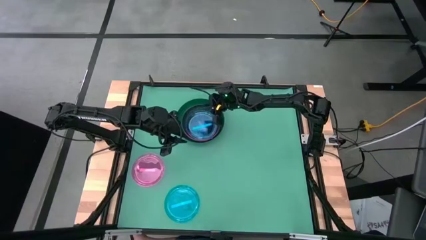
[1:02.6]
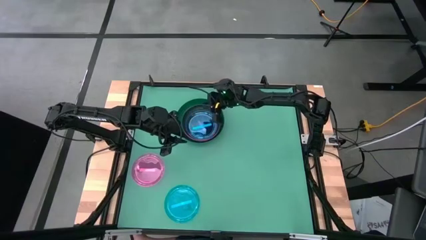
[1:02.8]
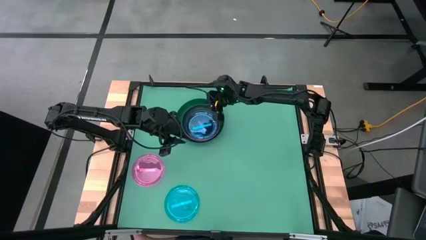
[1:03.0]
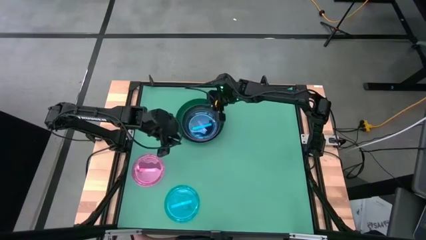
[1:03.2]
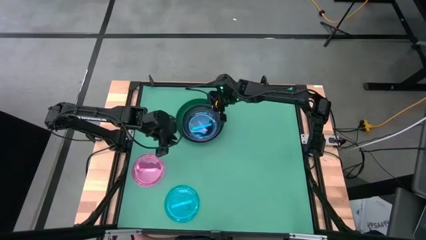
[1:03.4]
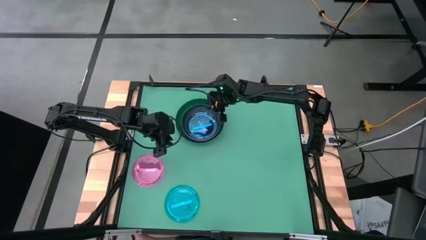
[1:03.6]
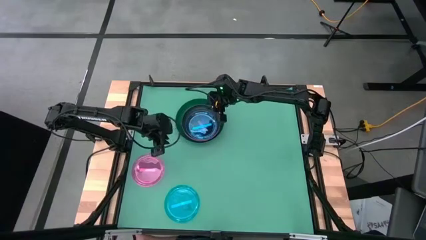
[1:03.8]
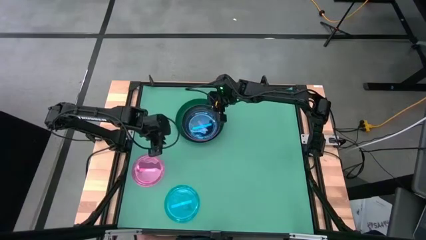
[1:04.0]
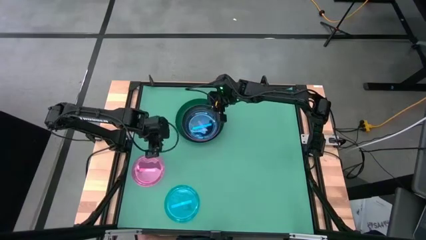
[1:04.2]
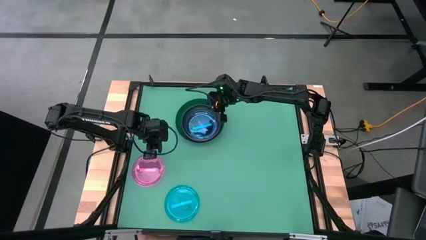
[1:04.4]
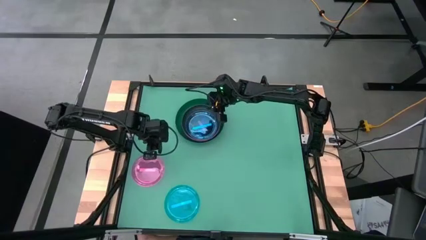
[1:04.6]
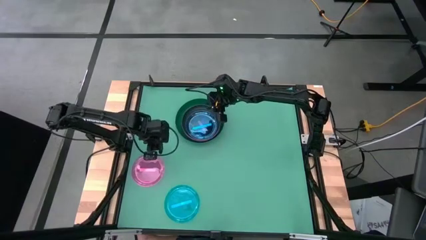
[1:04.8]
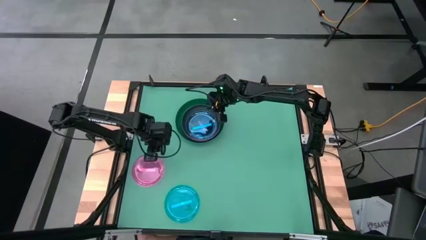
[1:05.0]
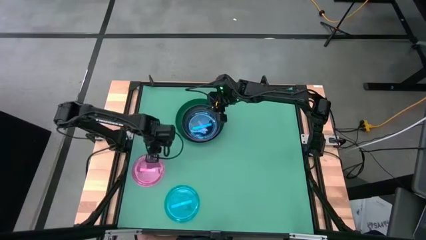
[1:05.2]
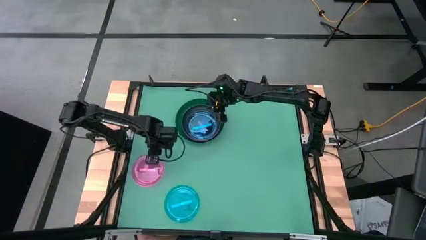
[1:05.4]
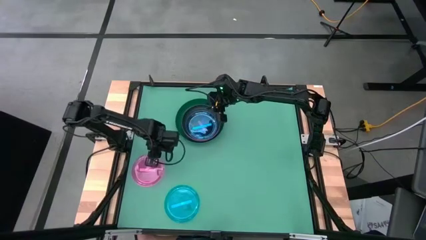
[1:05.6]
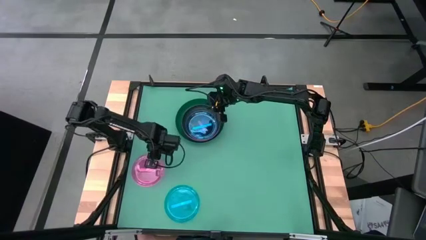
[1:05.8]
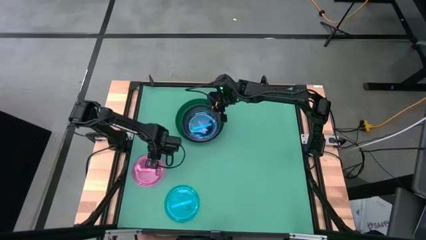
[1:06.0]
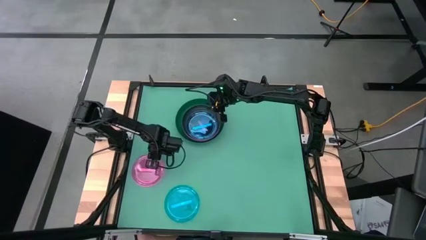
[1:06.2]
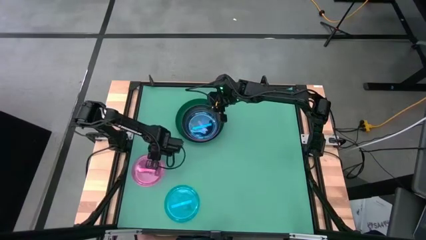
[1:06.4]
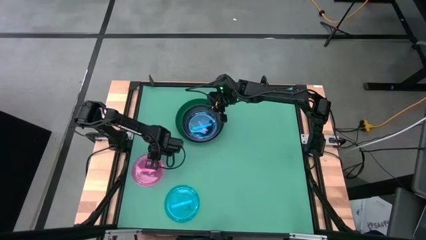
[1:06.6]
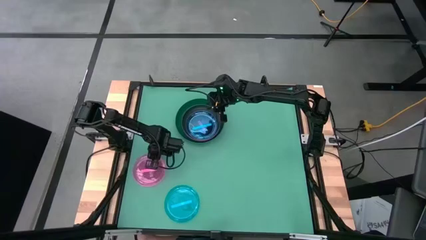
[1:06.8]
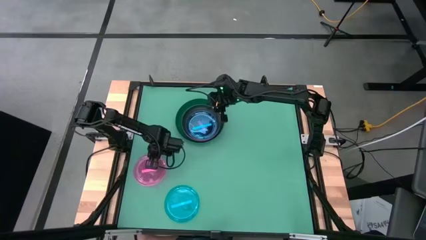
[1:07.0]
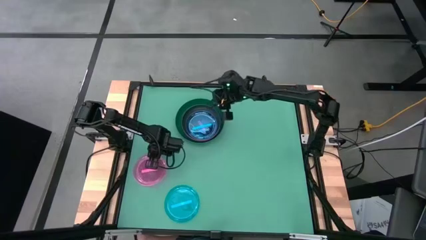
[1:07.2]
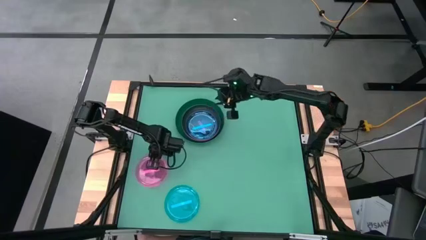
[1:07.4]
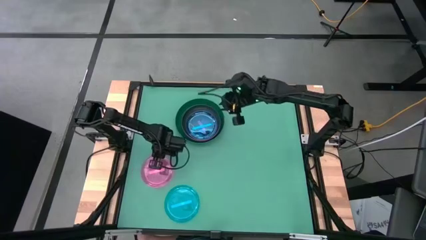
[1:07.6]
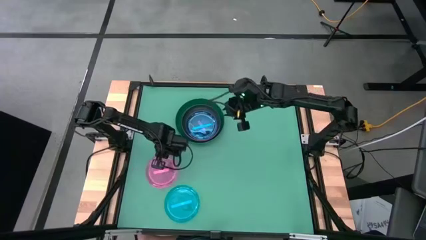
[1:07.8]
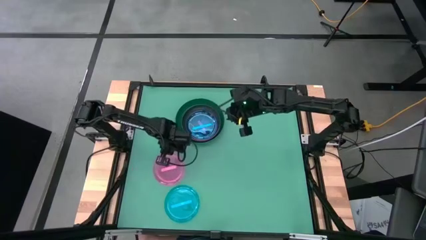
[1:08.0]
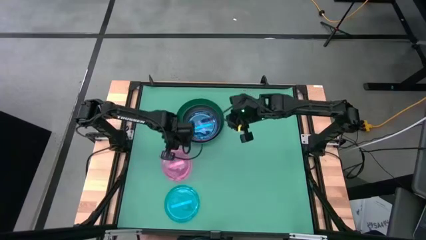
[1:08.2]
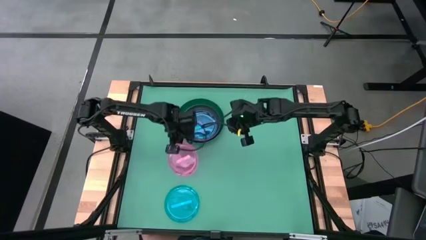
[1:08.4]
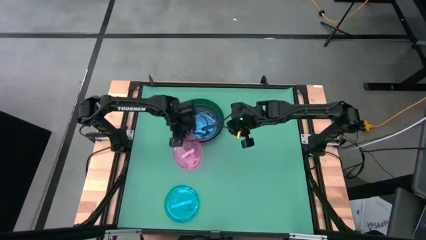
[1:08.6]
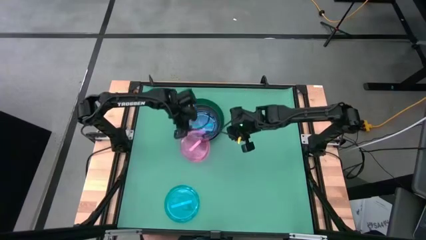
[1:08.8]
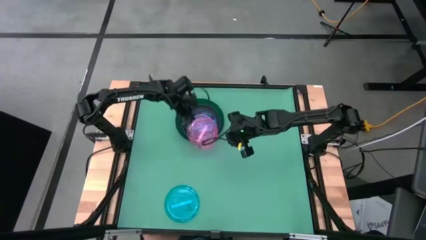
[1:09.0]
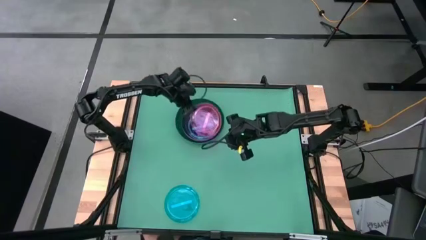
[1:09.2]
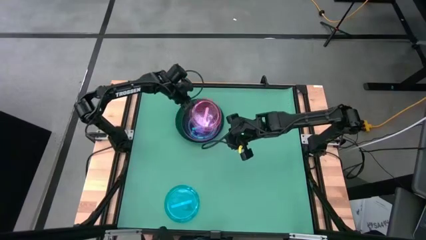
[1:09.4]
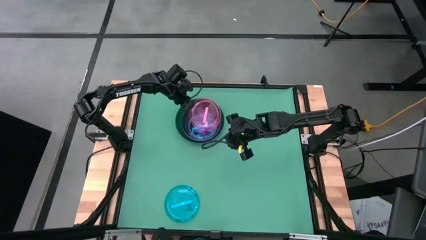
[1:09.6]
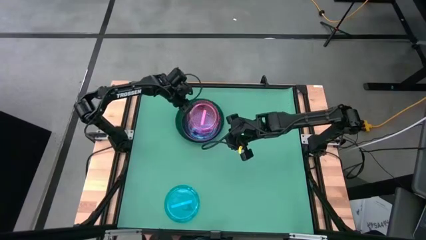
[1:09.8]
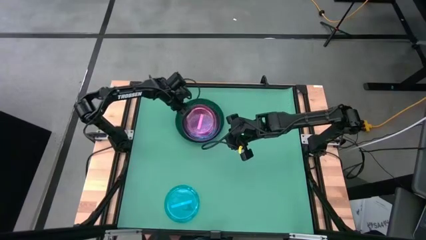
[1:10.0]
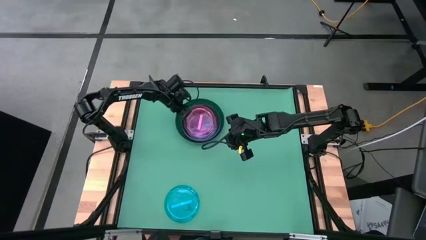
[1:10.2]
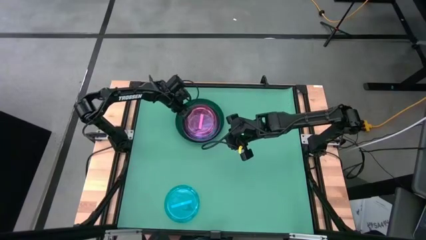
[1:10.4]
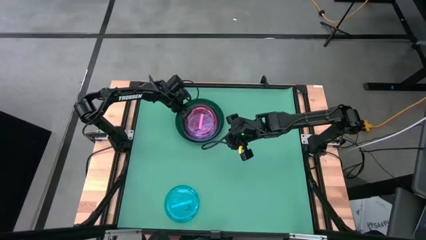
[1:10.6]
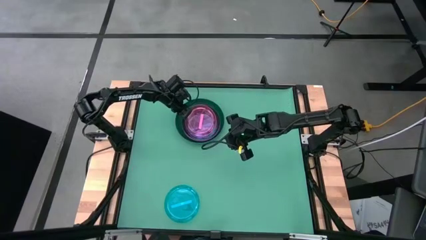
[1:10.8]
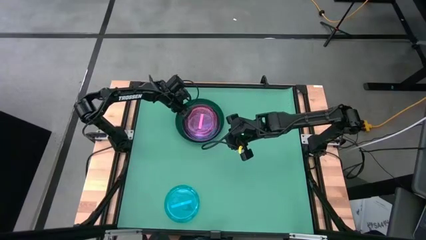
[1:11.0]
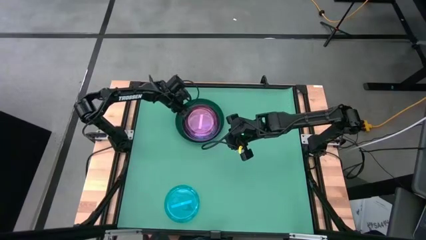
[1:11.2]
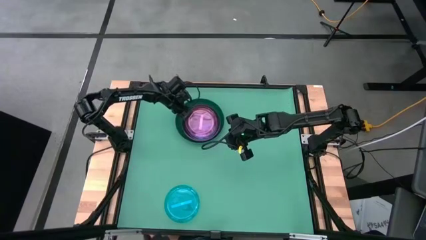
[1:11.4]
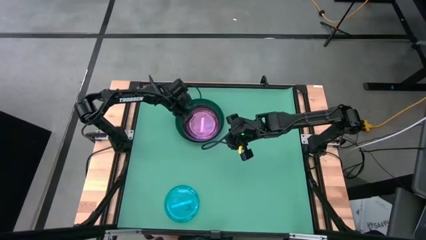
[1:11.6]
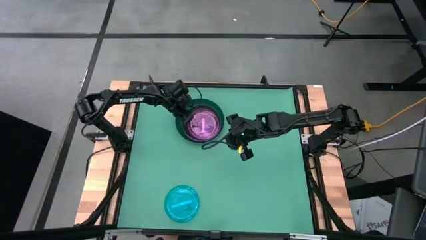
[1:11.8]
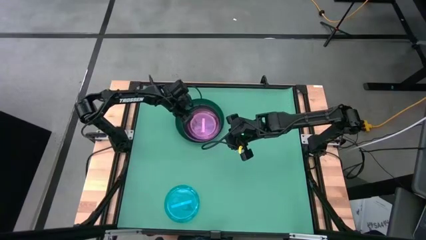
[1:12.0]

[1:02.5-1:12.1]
Task: Stack plastic plates
Stack the light pink plate on top of the blue plate

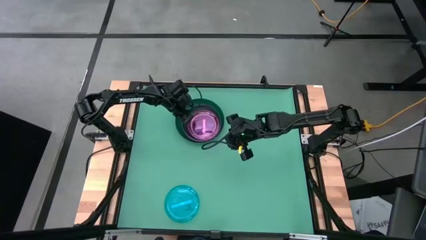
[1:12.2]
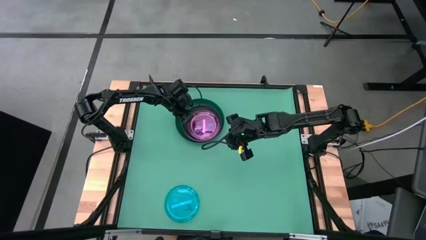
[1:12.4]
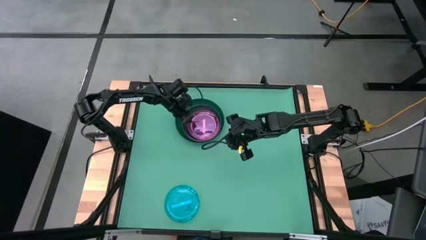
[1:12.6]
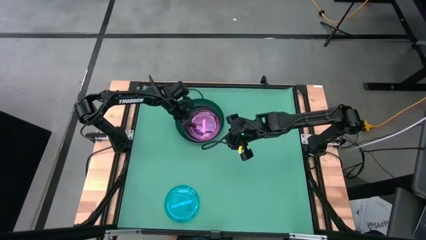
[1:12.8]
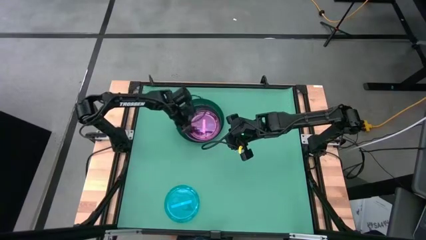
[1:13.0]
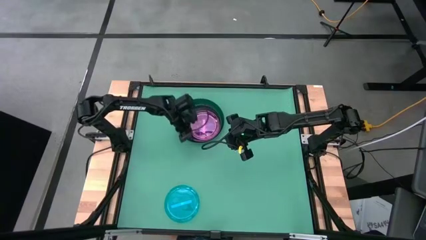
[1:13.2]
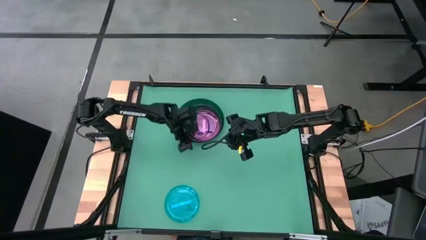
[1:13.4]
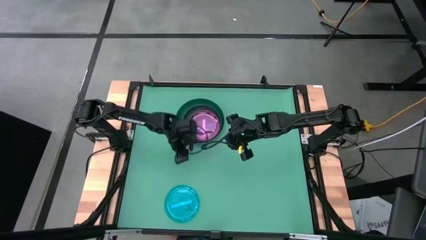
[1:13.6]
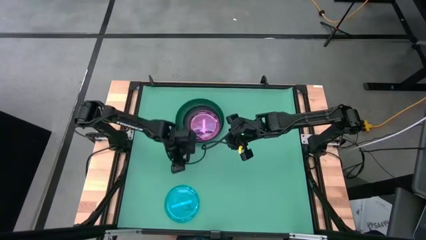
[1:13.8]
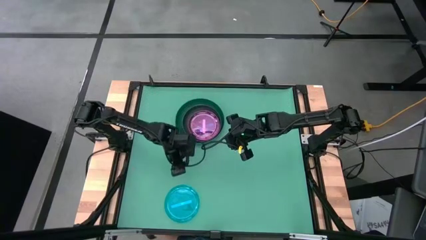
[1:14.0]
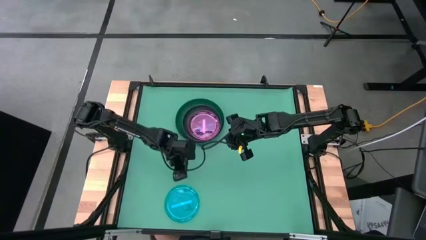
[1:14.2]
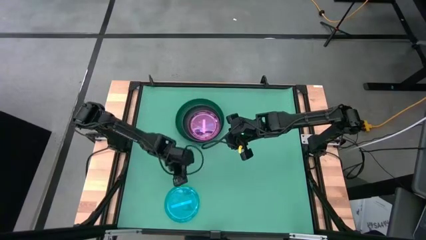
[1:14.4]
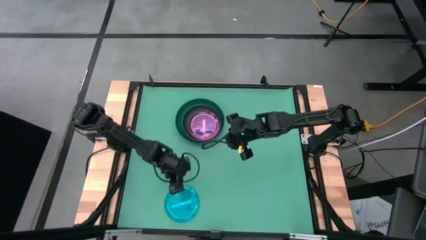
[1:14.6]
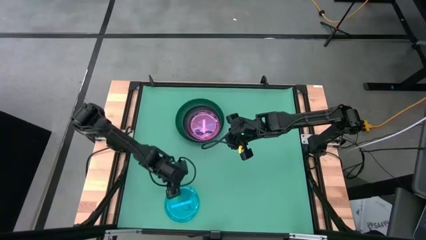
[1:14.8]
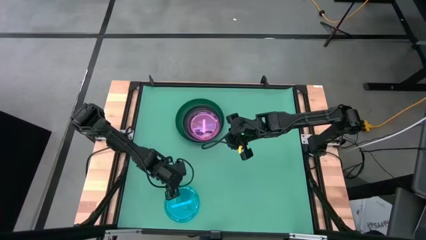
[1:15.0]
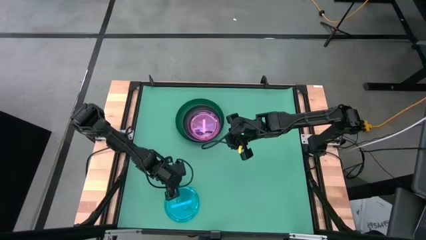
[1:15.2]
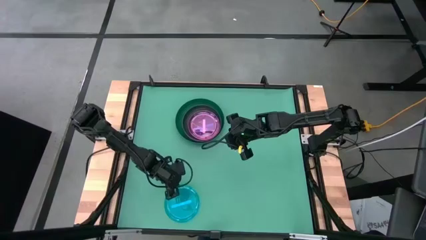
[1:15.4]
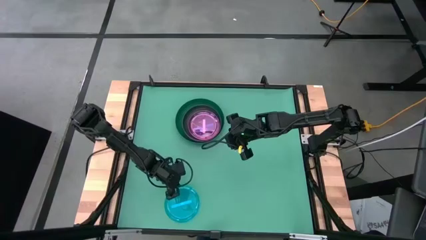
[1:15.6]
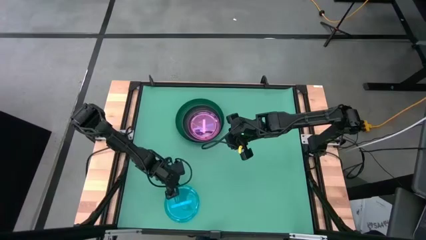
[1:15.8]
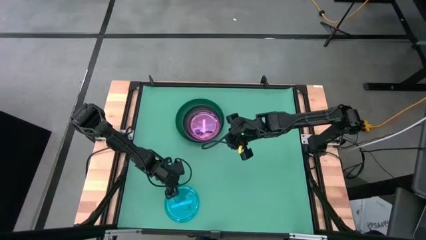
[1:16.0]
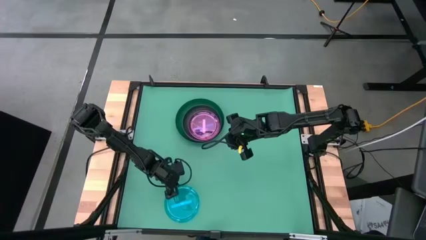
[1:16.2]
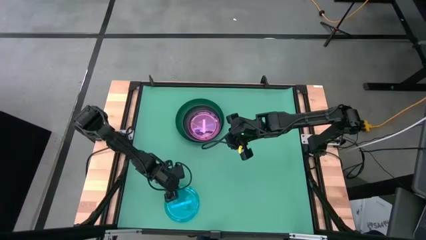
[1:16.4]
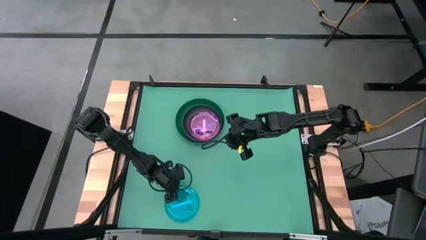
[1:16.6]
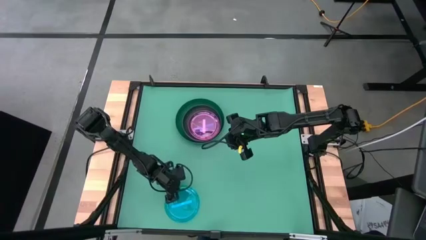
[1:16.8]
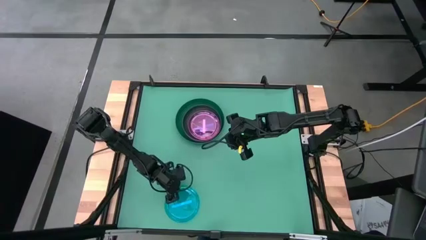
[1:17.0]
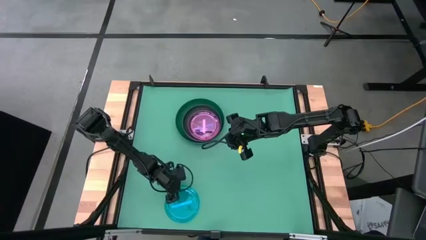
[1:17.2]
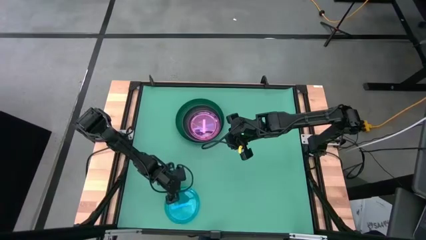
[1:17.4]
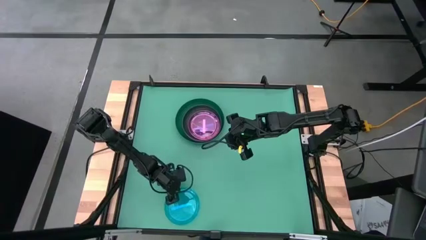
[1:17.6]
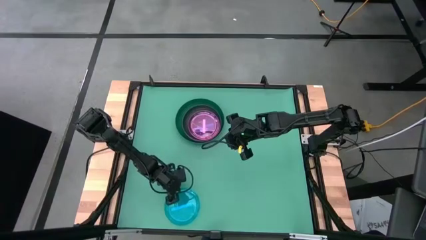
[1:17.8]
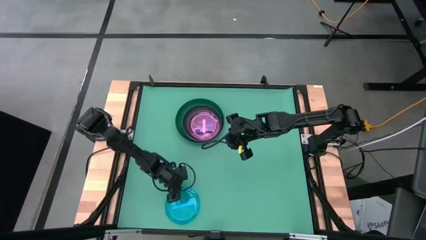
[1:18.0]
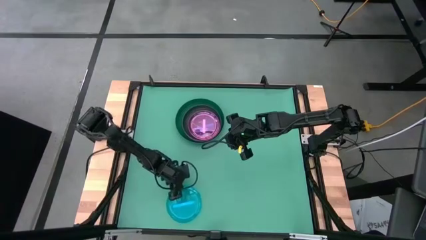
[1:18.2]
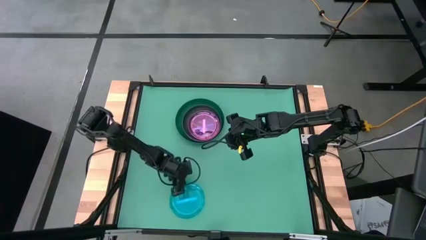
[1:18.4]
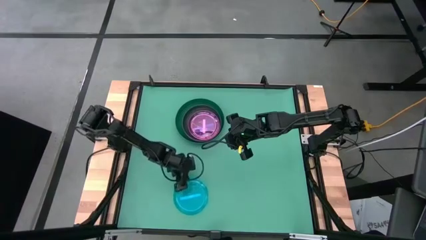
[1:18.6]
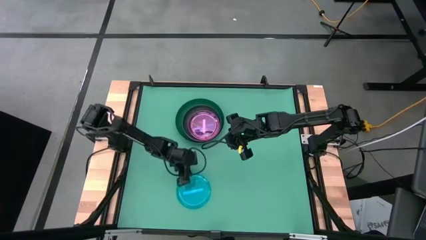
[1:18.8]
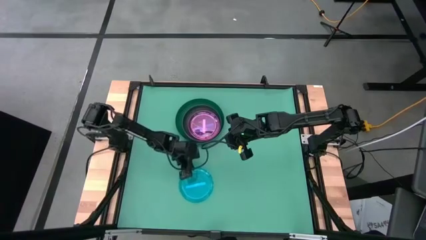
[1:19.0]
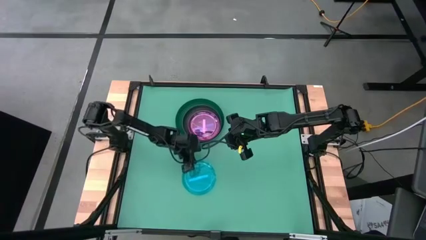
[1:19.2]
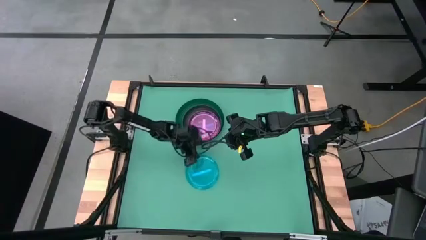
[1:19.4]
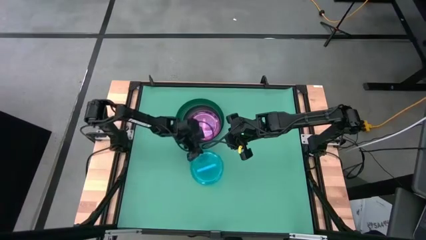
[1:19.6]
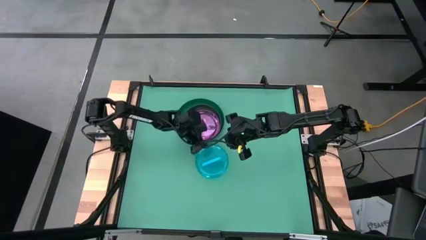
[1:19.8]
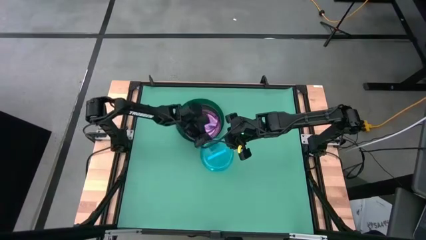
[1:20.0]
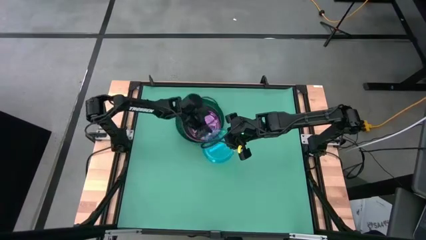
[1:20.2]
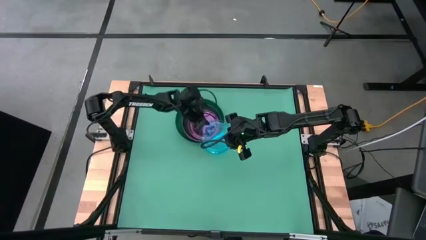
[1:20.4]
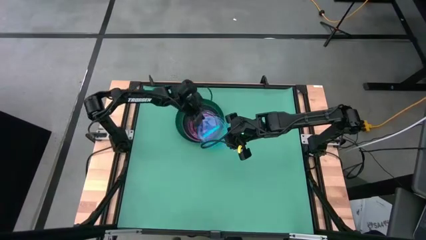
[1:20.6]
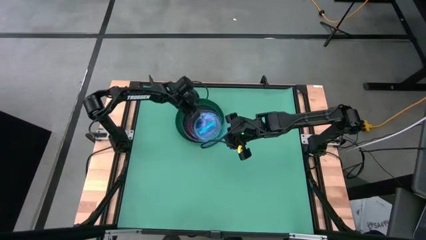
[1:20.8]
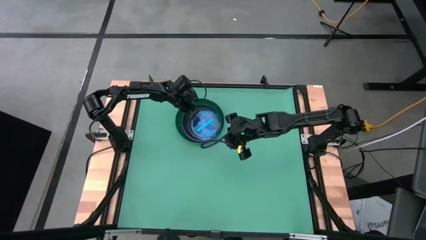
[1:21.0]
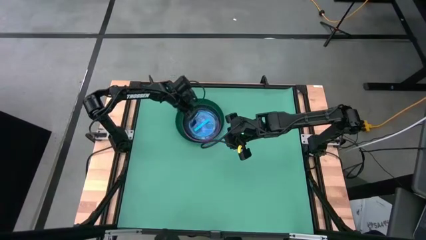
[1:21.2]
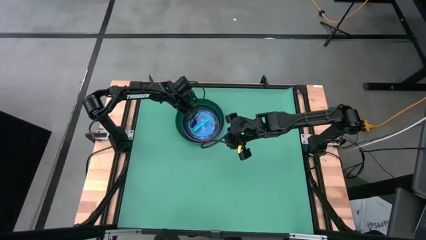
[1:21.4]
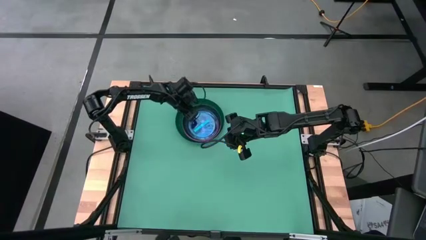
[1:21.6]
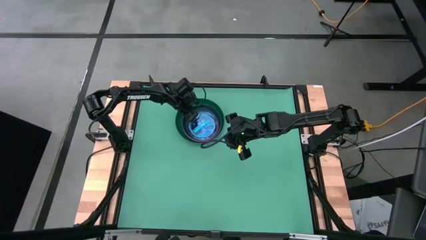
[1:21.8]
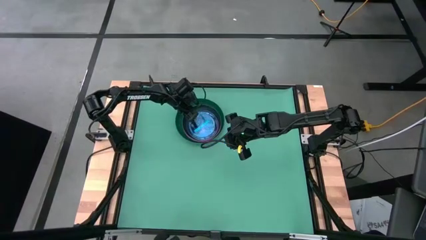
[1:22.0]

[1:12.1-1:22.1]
Stack the blue plate on top of the light pink plate
